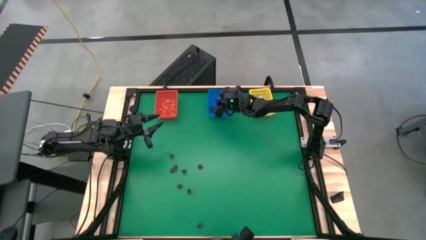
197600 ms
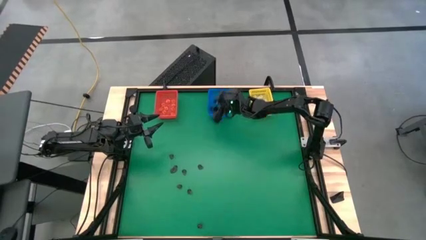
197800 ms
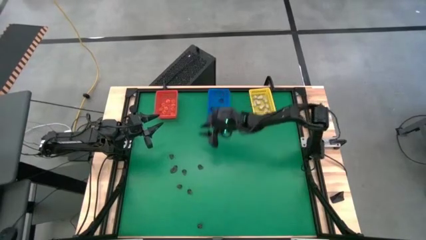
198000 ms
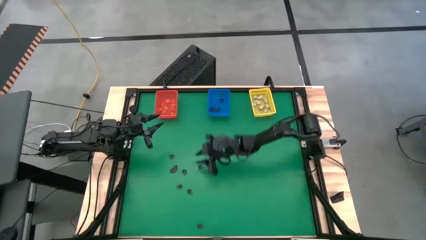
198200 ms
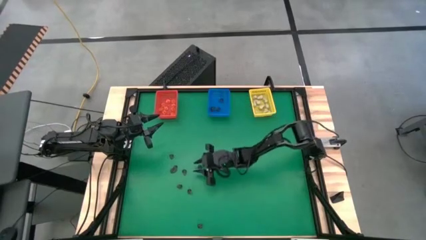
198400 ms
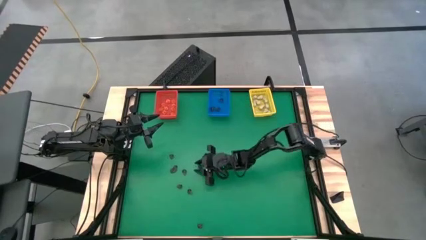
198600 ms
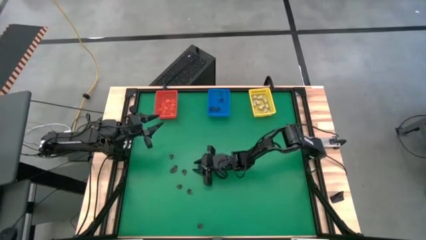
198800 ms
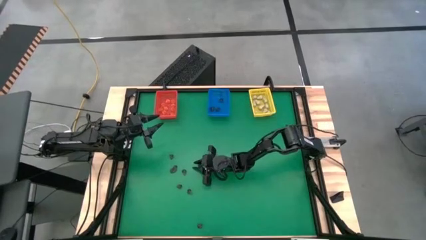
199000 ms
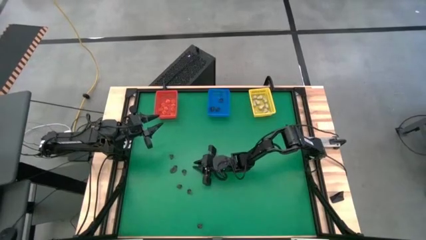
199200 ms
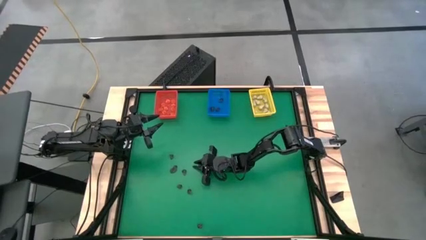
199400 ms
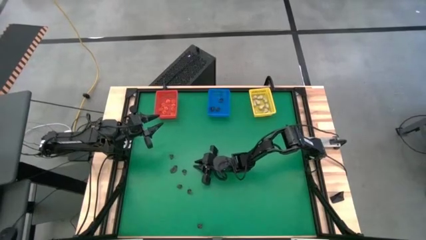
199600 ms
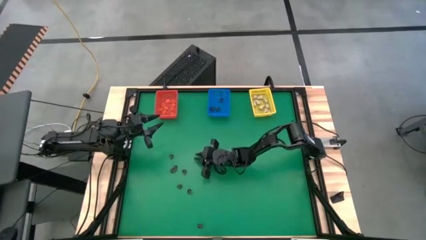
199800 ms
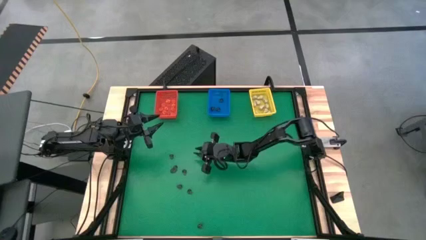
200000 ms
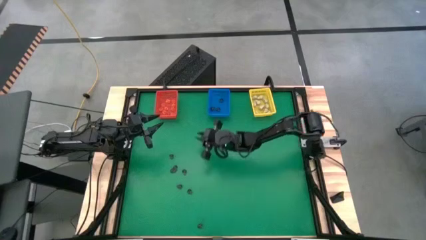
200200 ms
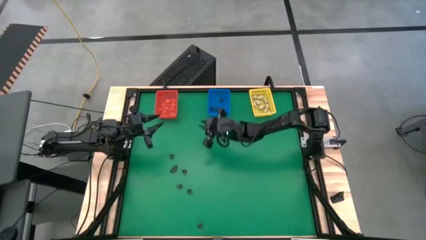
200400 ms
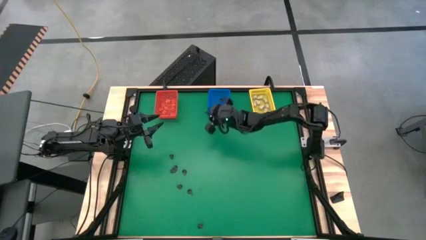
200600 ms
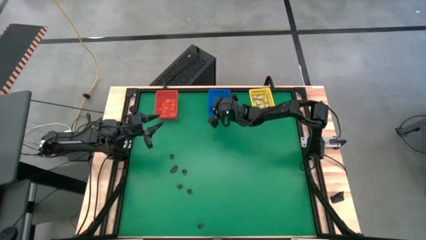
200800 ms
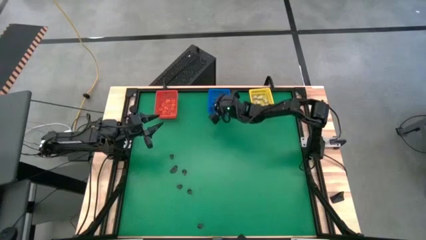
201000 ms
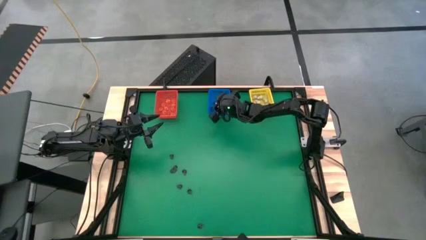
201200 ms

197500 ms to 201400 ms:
Task: Sort Halloween decoration
Put the black skull toy into the blue bin

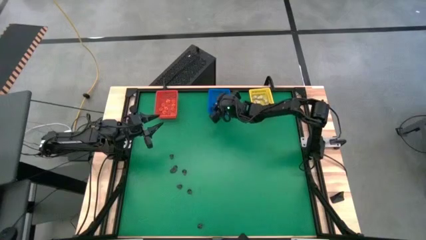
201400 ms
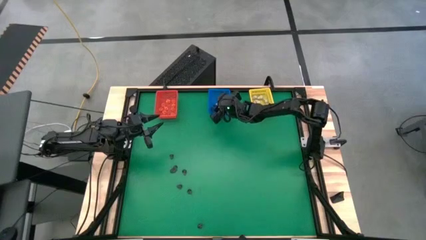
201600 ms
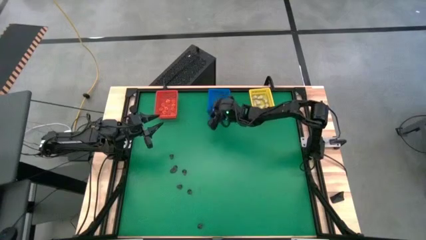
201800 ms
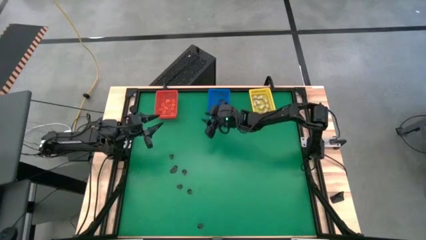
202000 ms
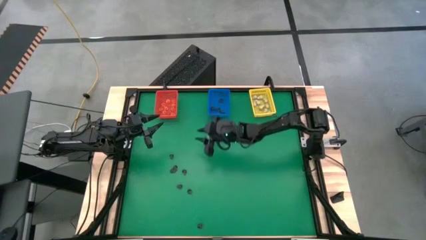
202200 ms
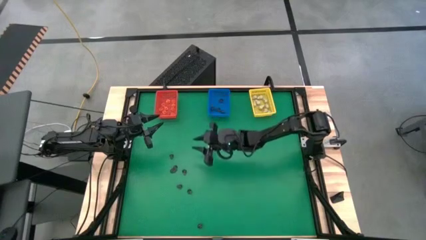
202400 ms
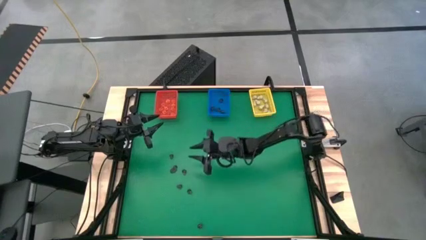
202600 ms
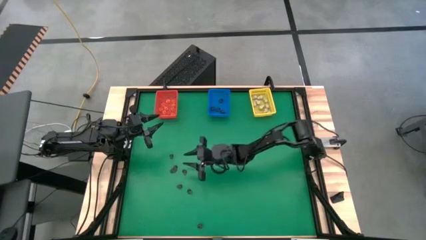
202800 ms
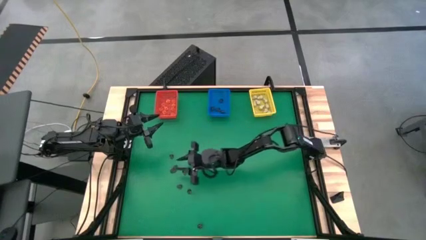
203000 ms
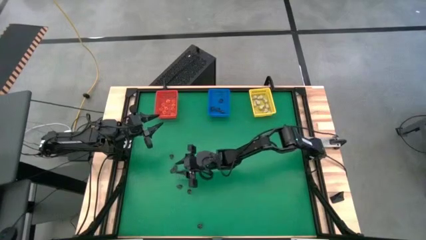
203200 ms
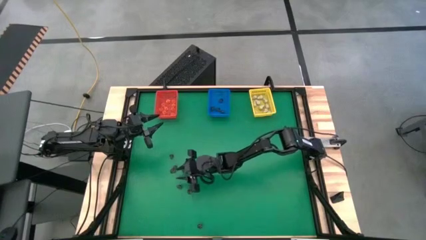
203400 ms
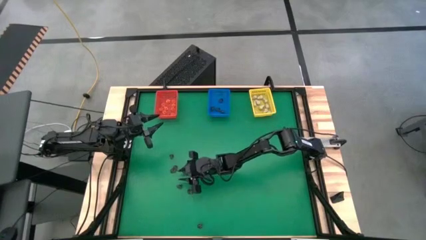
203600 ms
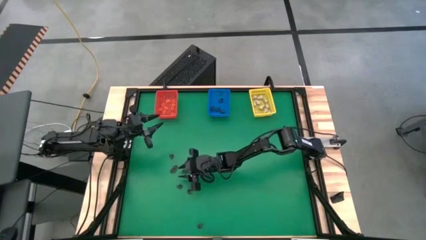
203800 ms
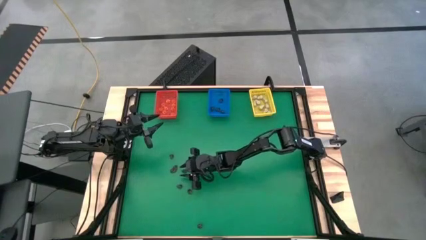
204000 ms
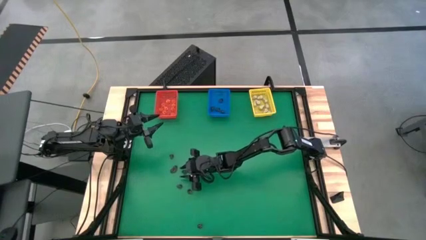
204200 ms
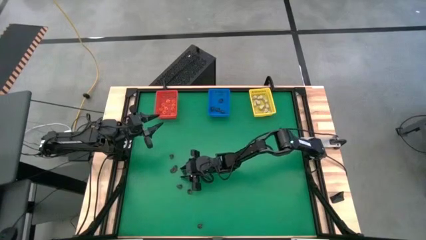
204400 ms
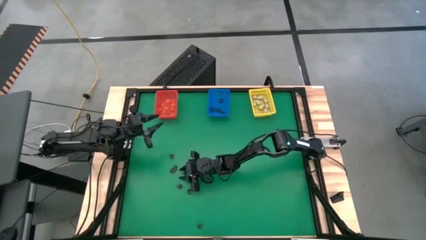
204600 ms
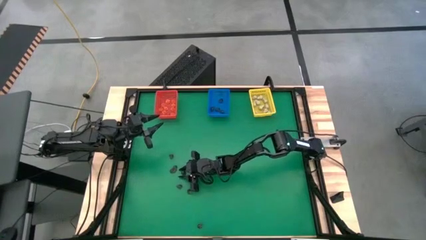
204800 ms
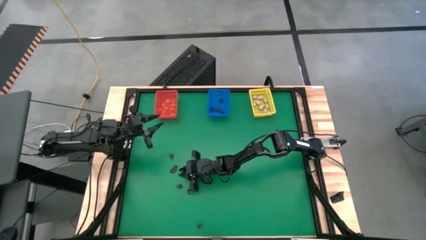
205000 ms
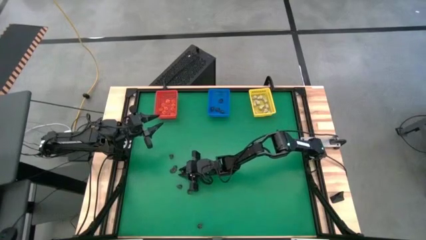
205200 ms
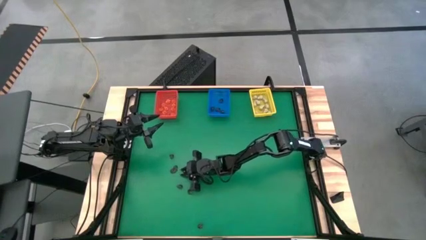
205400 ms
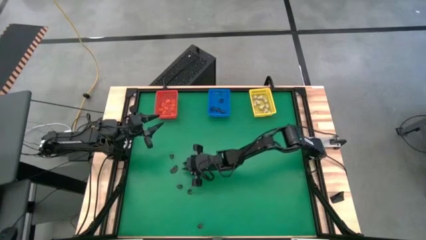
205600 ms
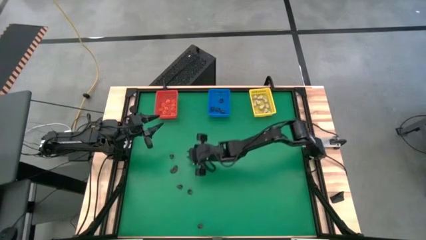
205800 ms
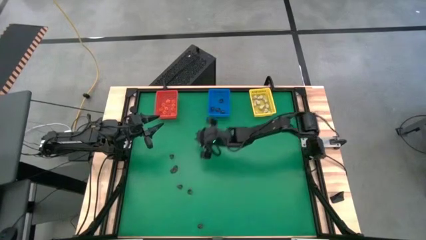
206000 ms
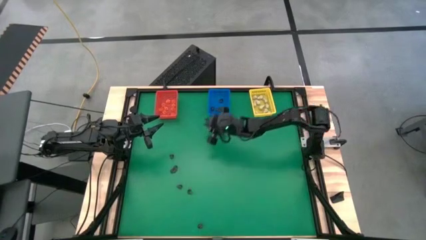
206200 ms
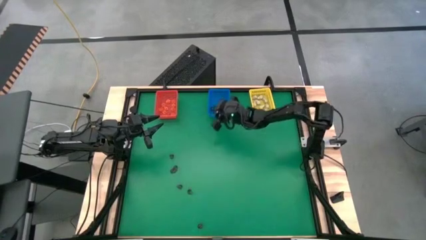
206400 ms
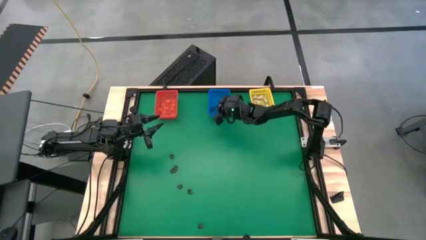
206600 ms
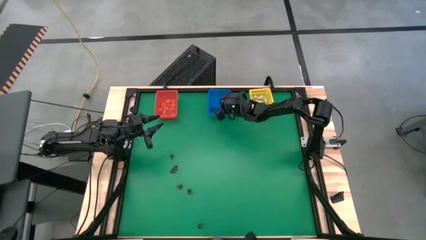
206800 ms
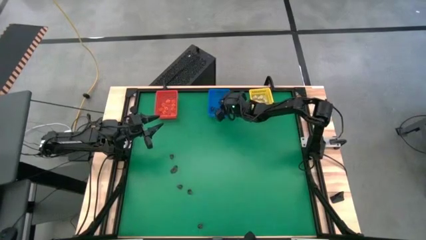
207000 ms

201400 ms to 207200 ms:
Put the black skull toy into the blue bin

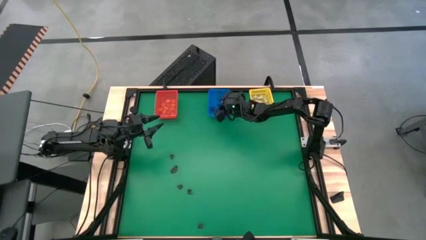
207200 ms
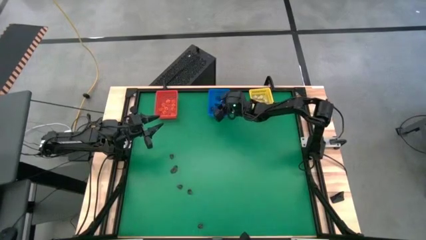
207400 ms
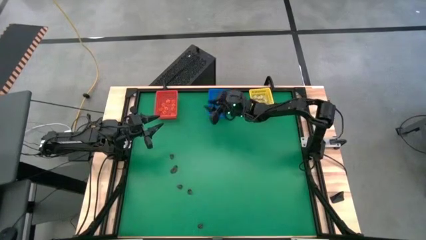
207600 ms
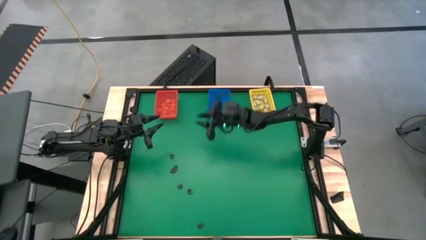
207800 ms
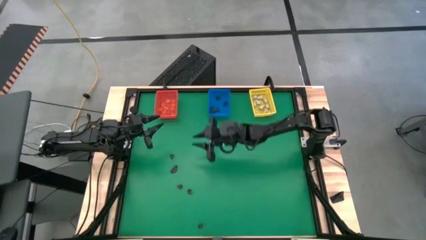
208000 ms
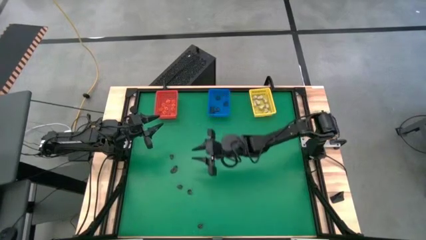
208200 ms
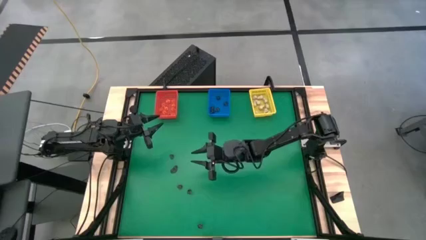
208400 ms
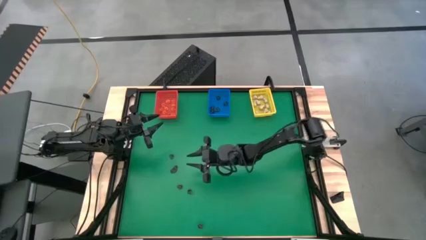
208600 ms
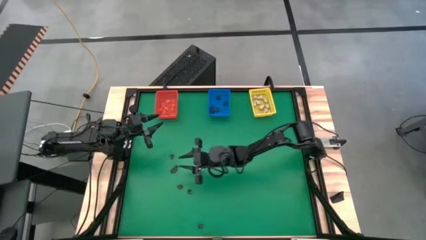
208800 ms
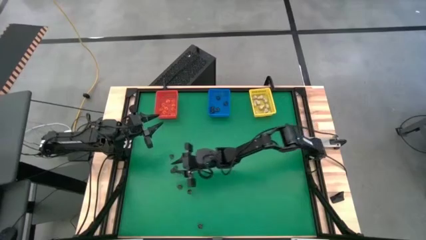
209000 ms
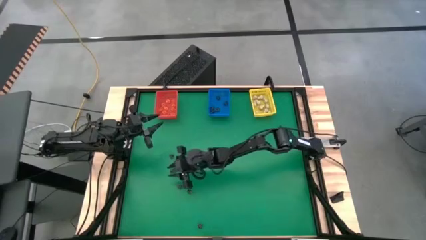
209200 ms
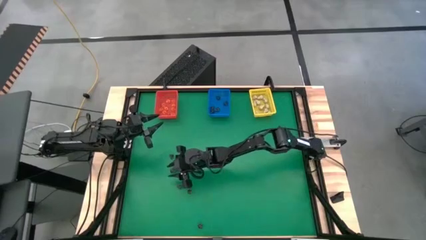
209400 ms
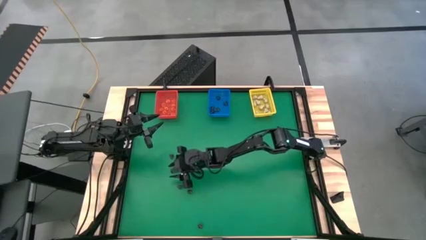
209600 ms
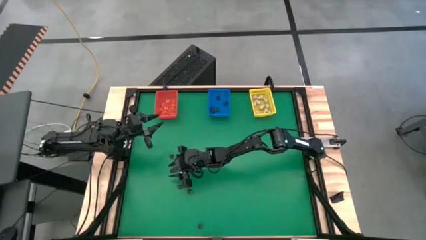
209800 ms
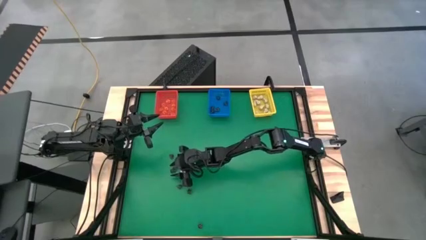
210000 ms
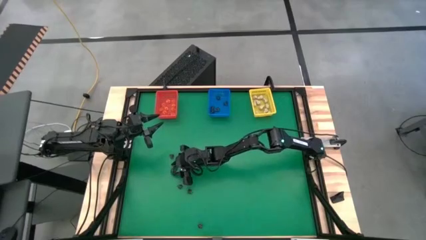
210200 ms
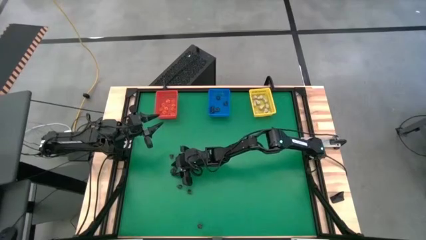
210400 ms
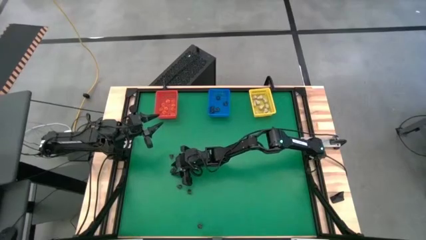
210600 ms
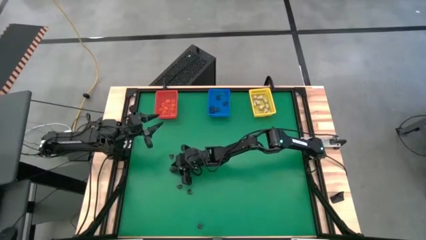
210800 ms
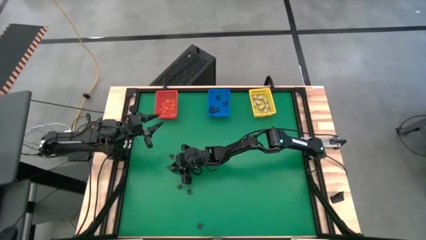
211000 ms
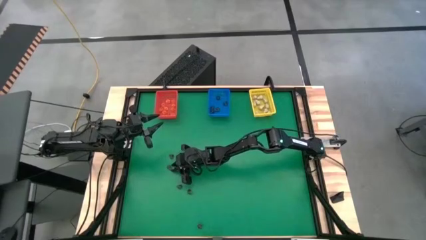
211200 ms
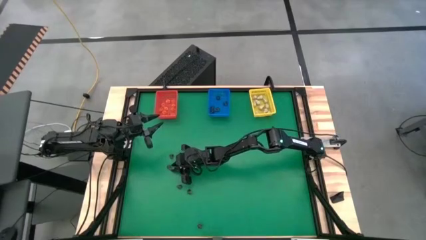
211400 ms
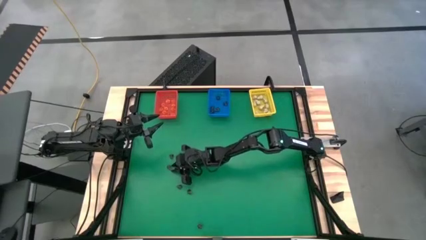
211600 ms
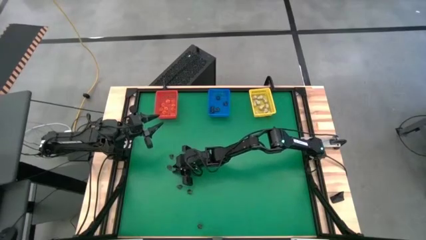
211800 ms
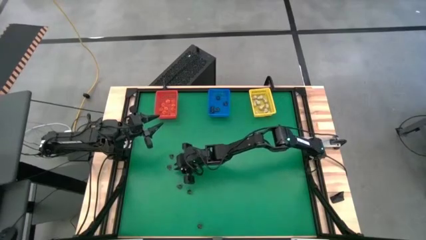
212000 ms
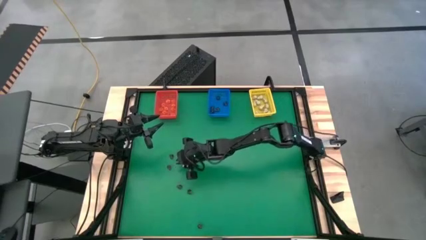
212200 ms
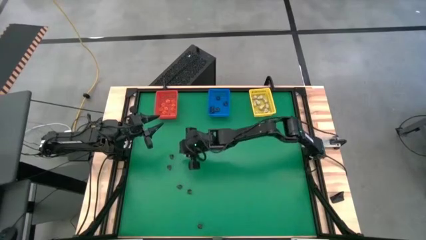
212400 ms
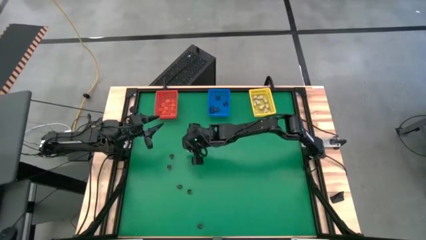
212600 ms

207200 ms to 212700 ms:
Put the black skull toy into the blue bin
